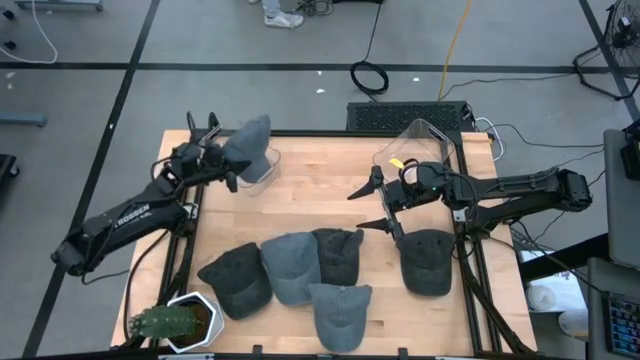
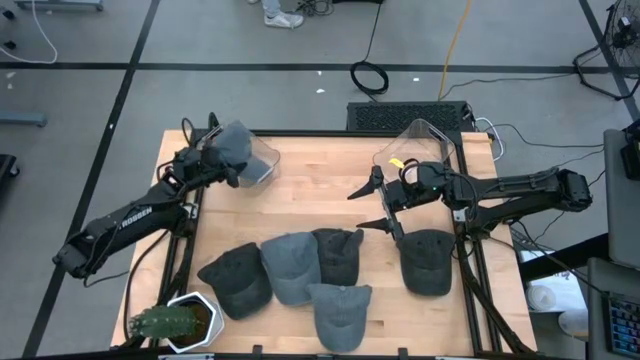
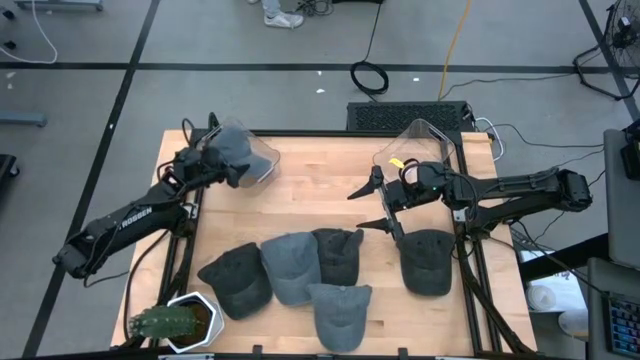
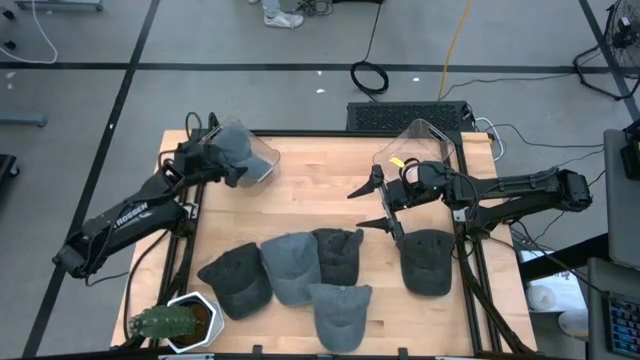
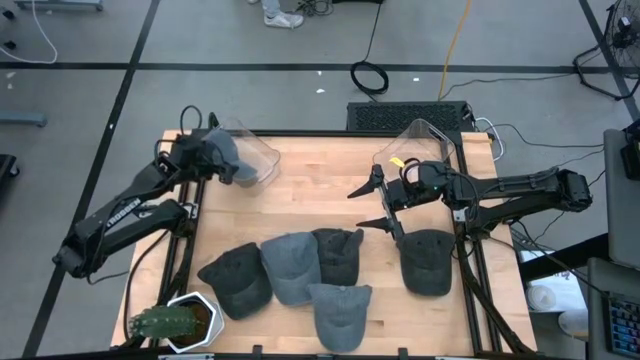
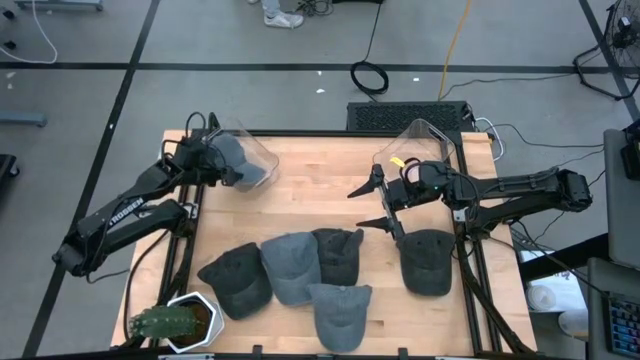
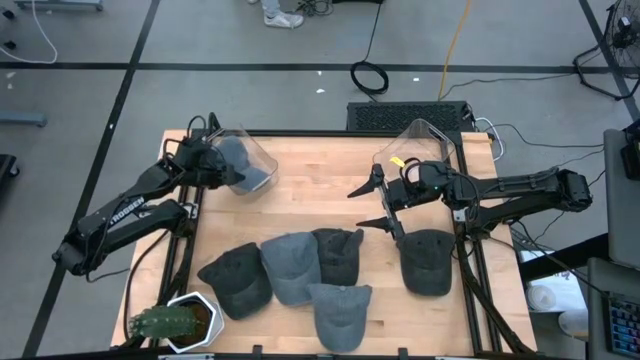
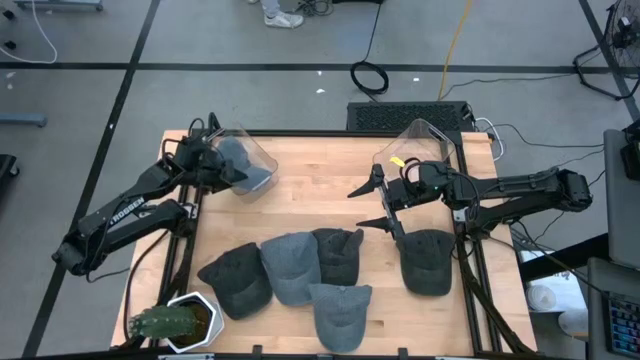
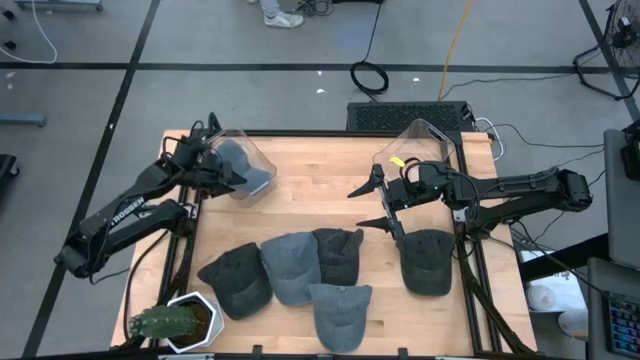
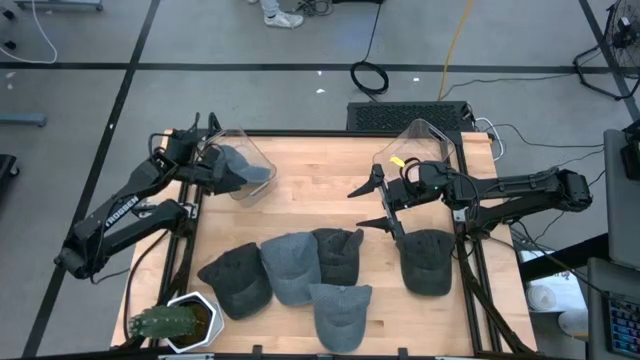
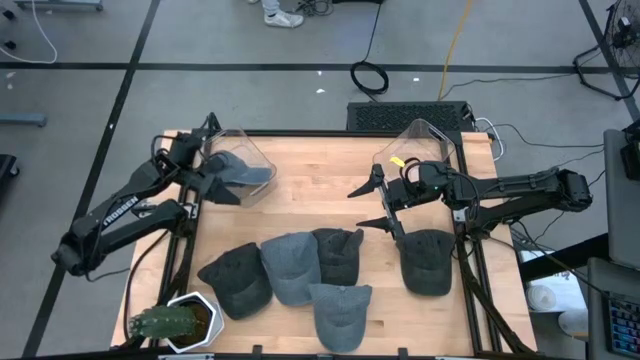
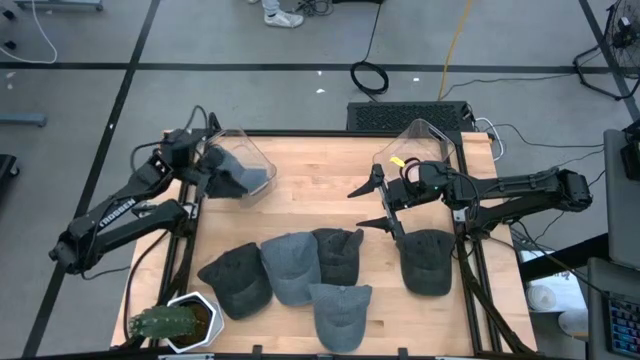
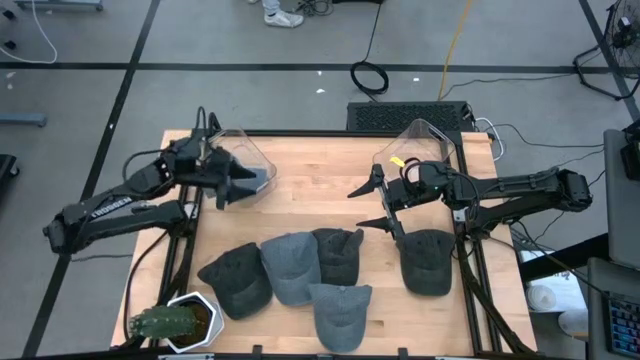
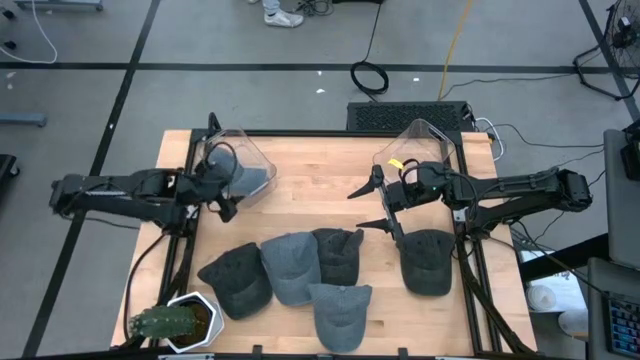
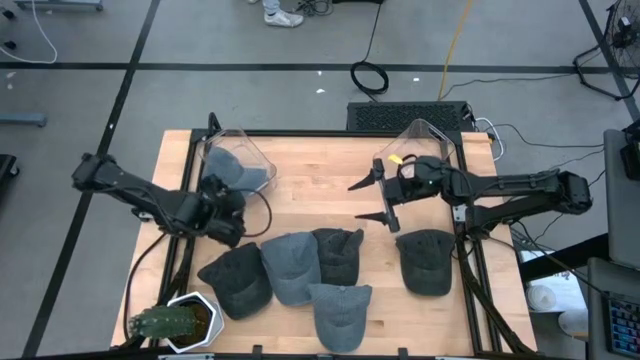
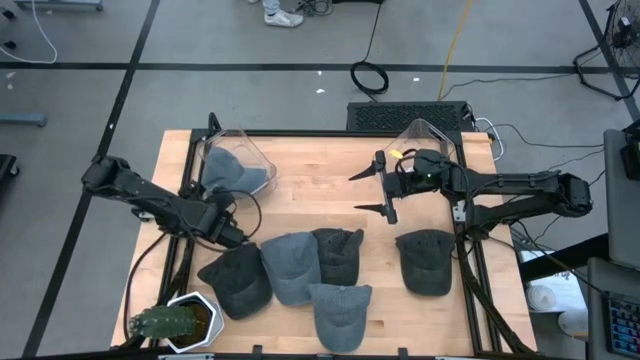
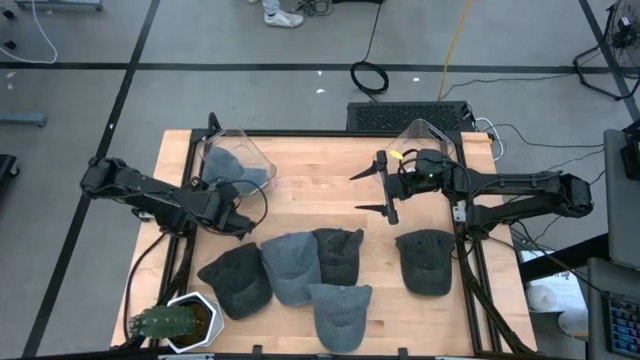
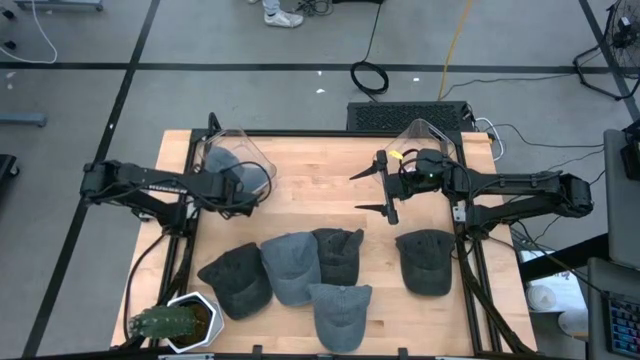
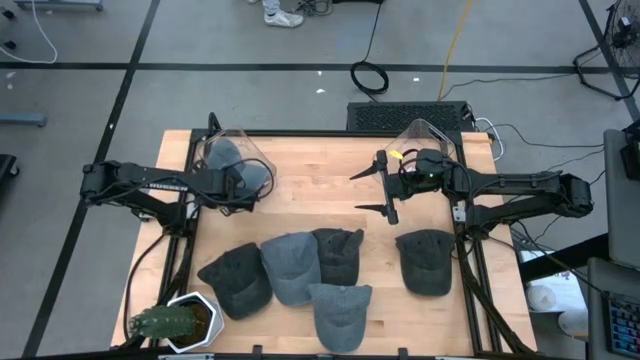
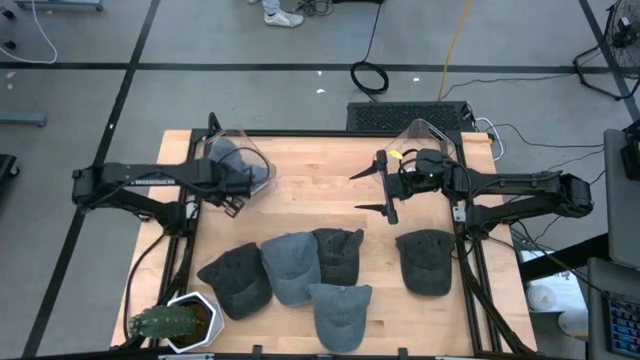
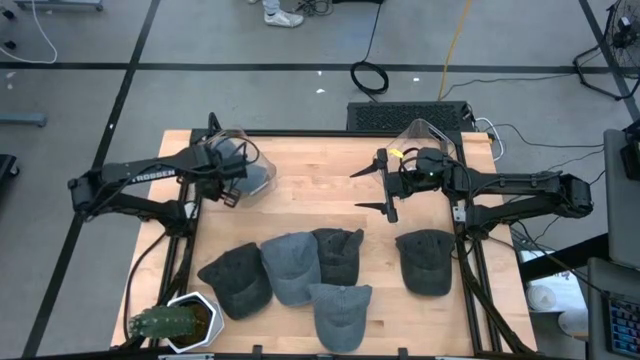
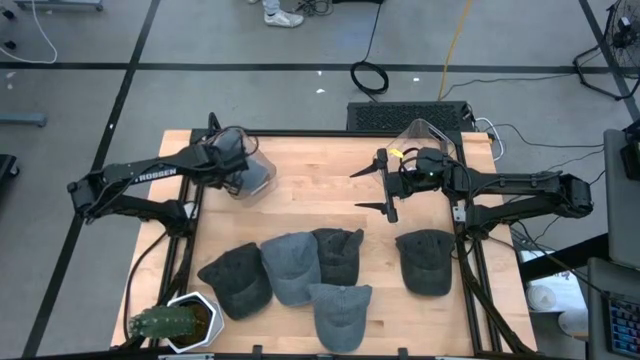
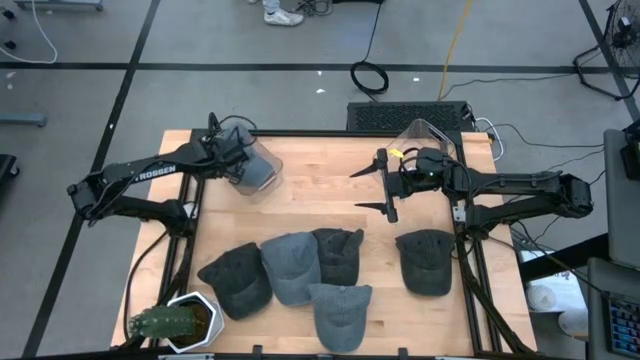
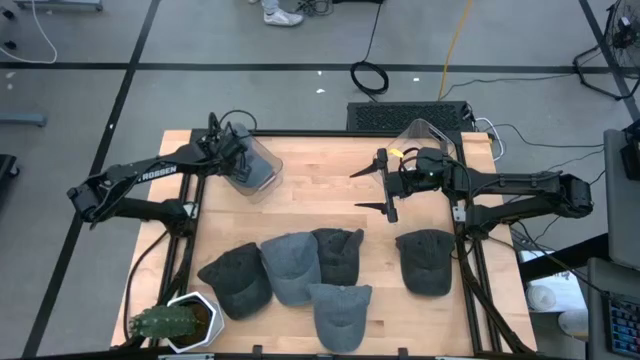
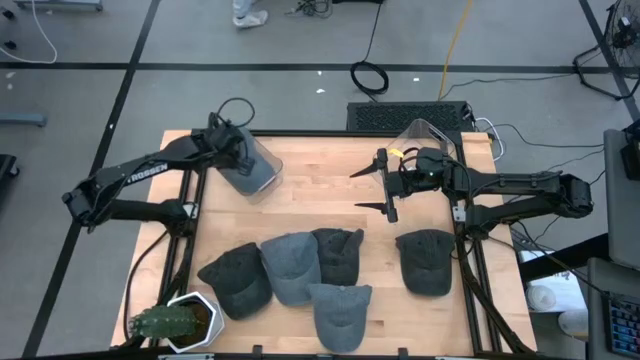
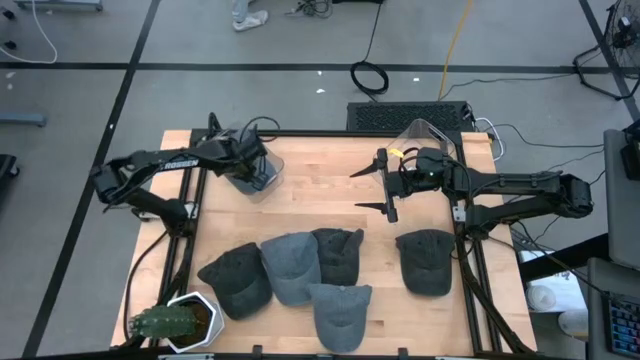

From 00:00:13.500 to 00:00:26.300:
Task: Pick & Place hat
Put the right blue cap into the left transparent bin
